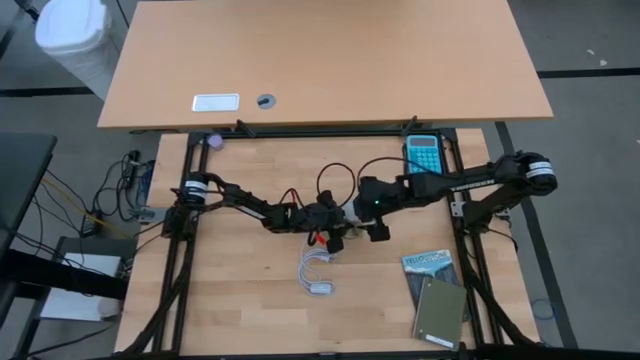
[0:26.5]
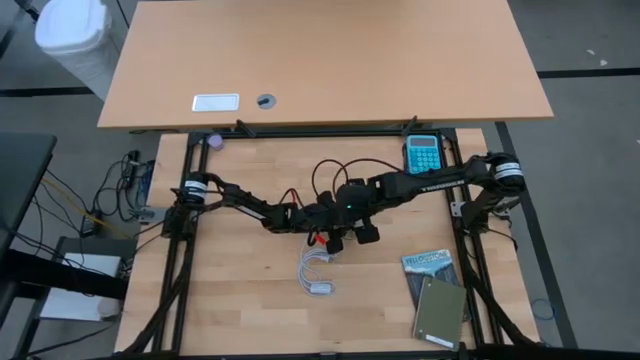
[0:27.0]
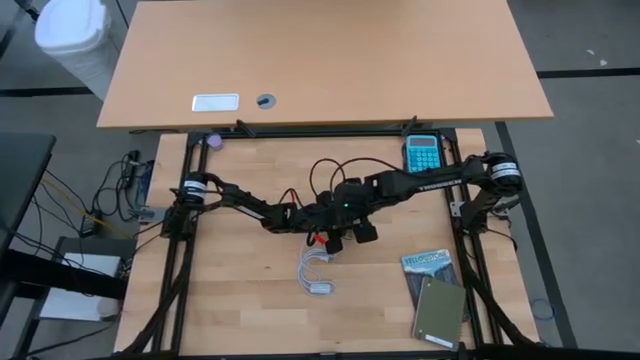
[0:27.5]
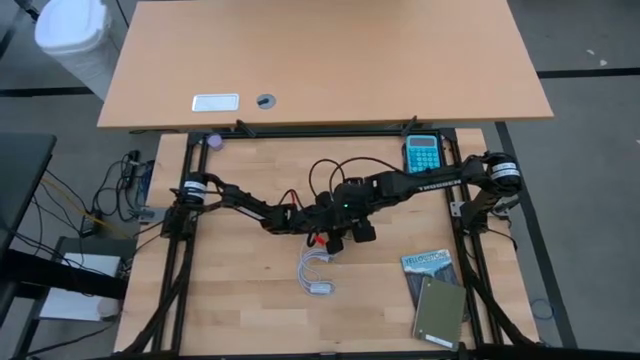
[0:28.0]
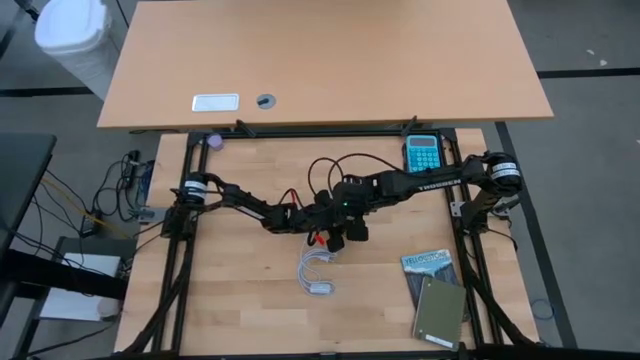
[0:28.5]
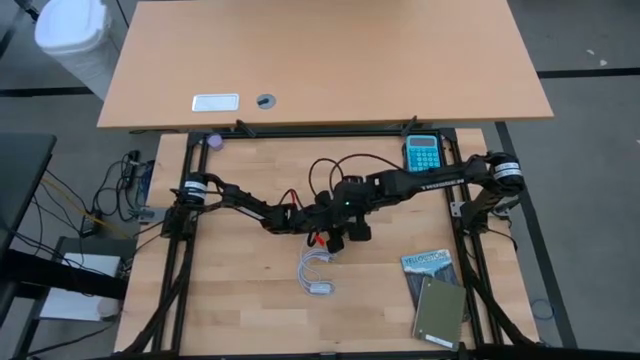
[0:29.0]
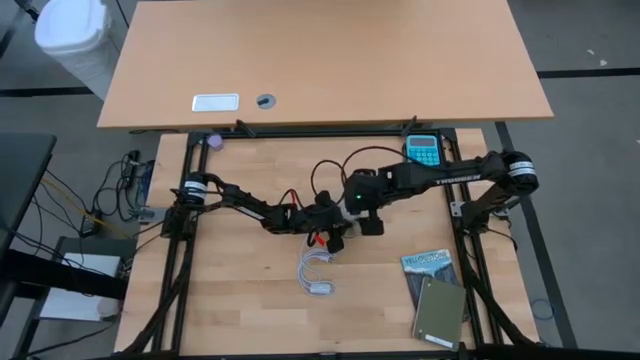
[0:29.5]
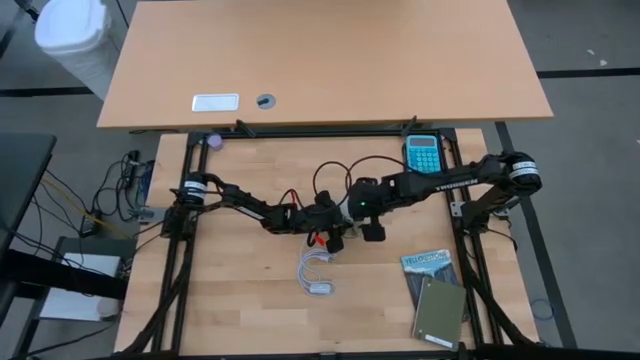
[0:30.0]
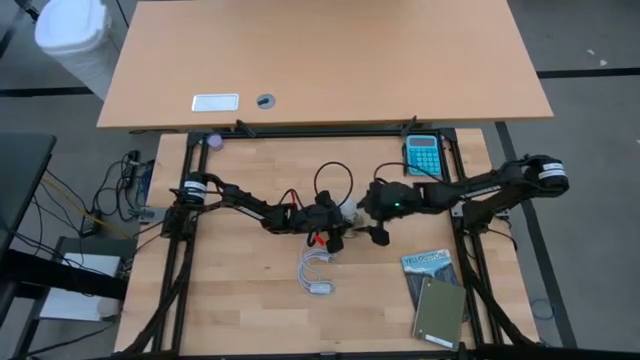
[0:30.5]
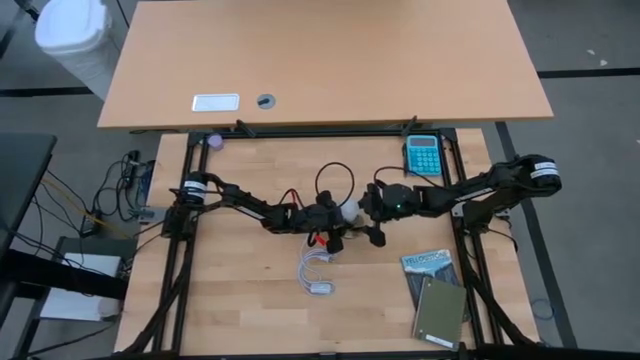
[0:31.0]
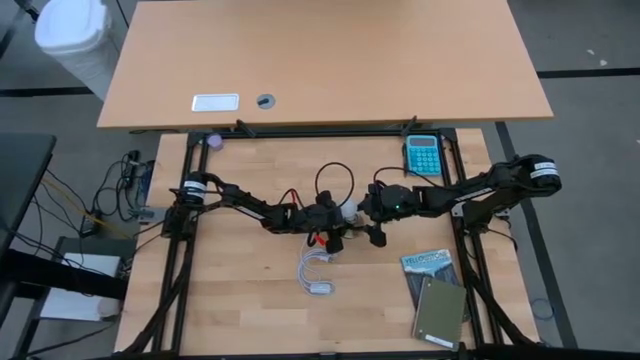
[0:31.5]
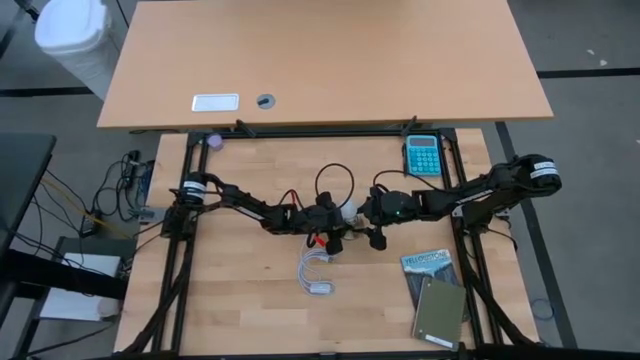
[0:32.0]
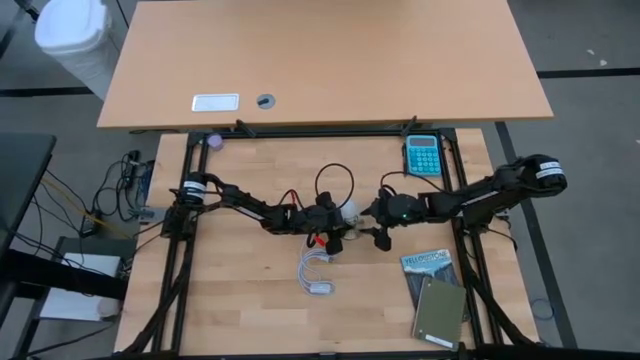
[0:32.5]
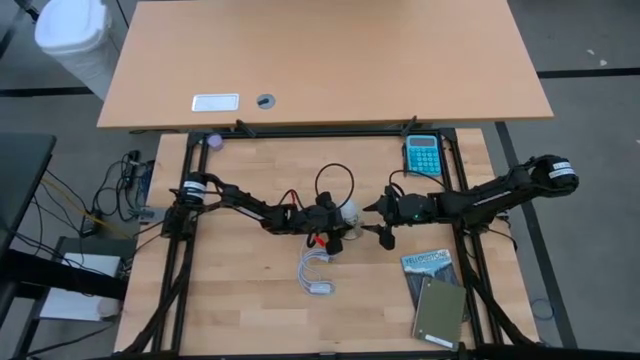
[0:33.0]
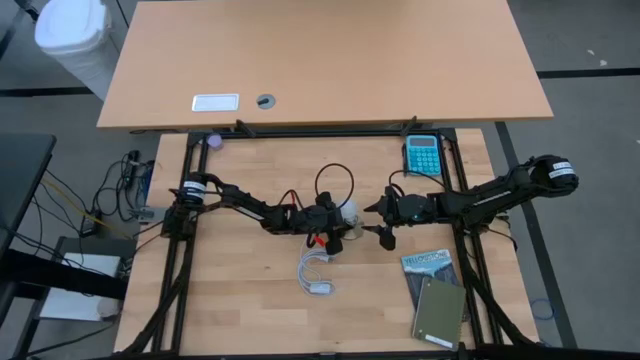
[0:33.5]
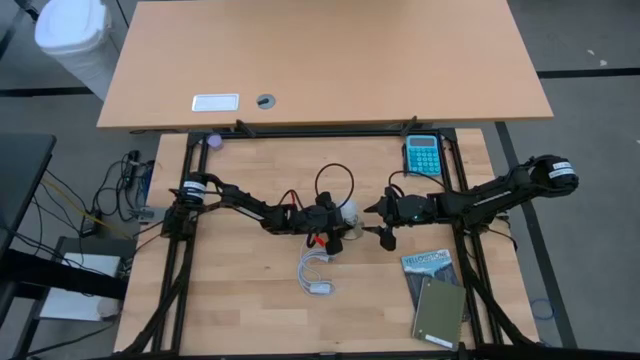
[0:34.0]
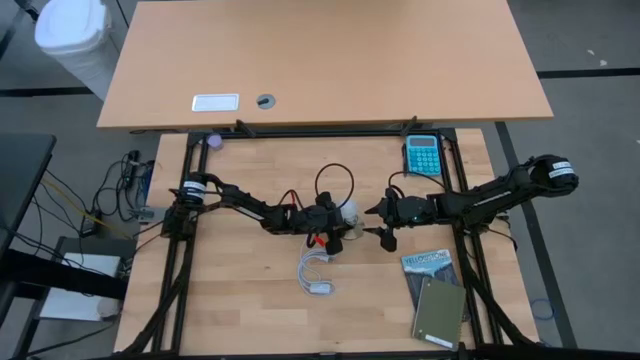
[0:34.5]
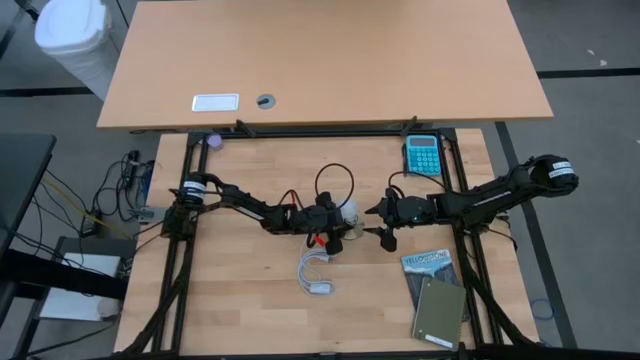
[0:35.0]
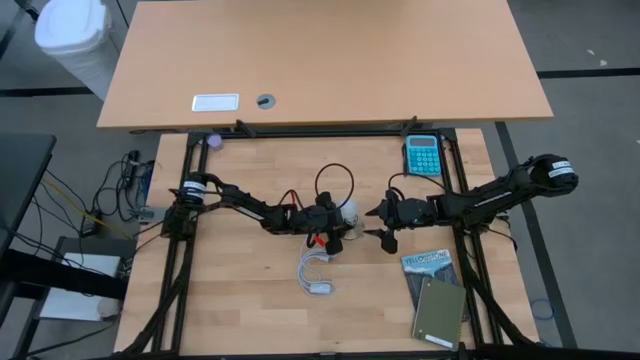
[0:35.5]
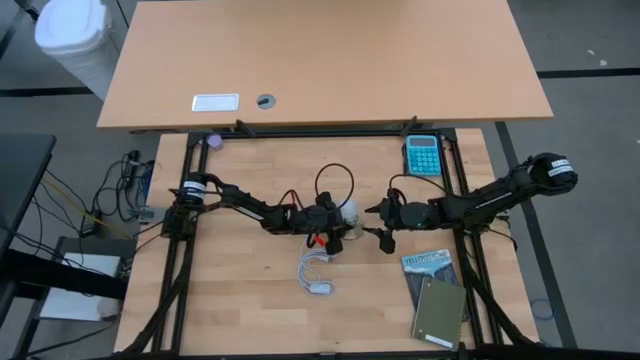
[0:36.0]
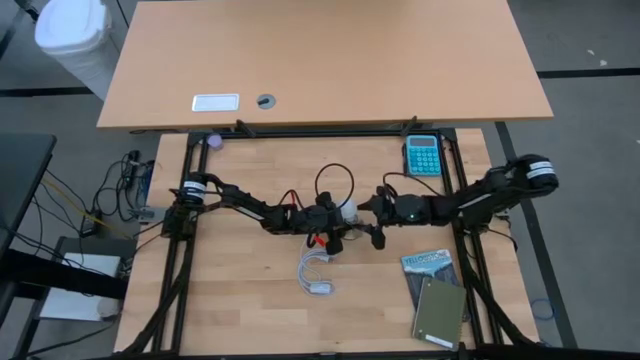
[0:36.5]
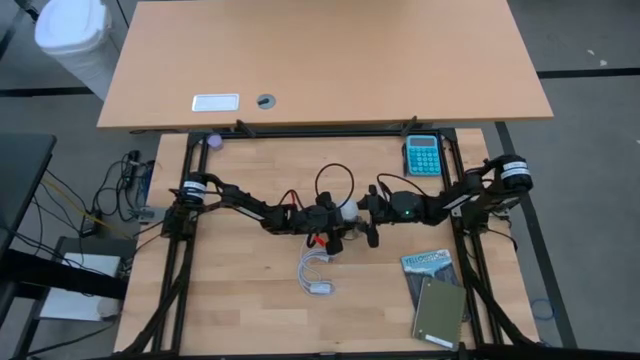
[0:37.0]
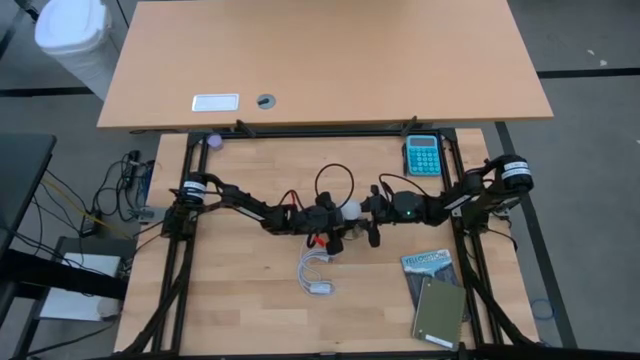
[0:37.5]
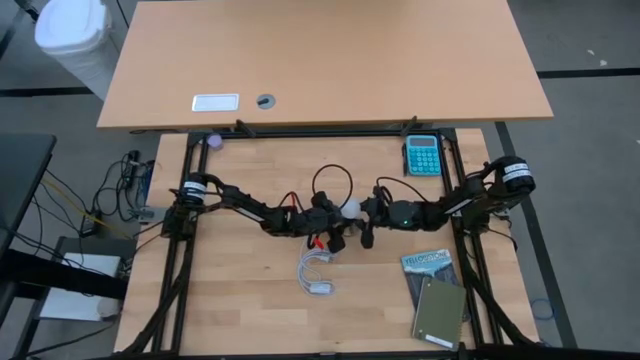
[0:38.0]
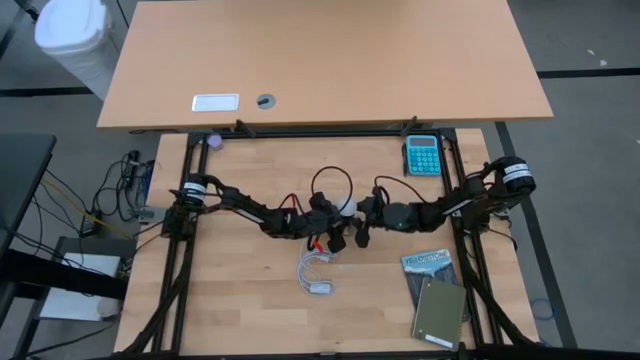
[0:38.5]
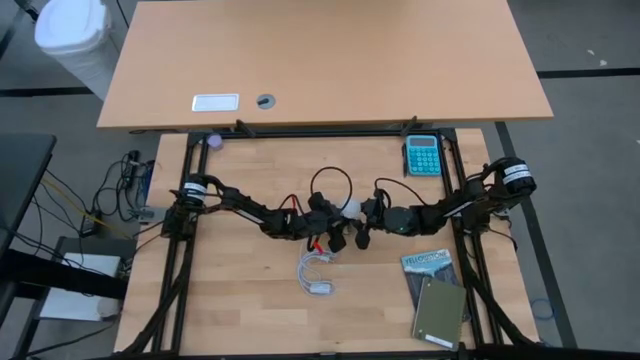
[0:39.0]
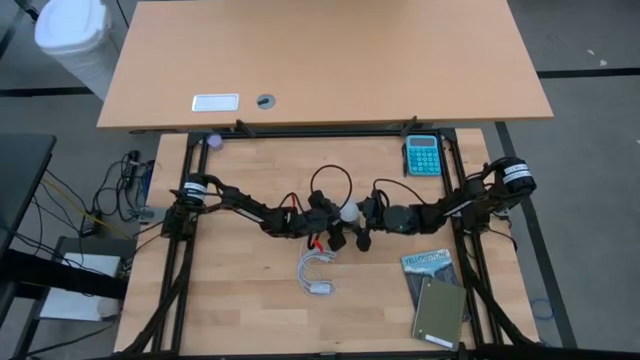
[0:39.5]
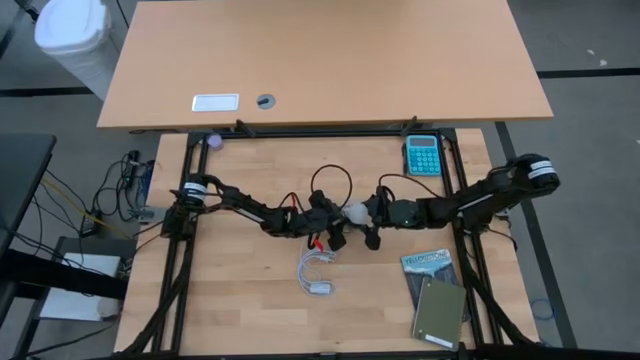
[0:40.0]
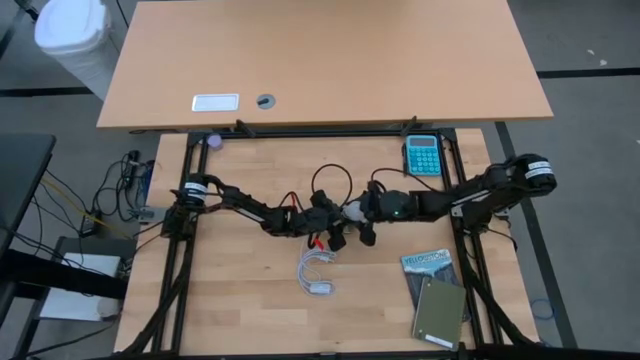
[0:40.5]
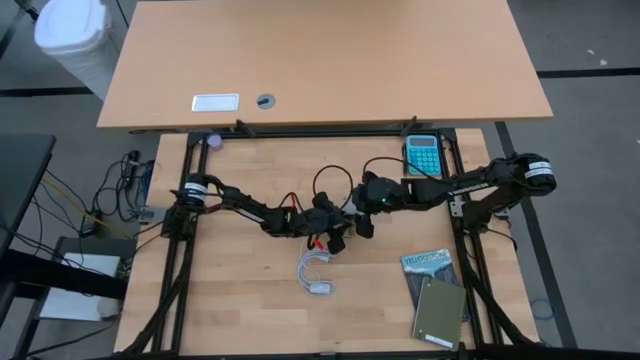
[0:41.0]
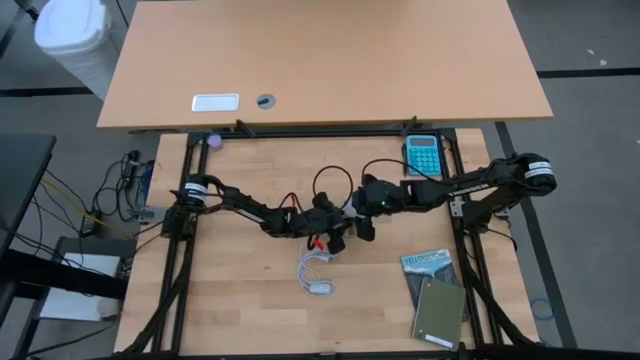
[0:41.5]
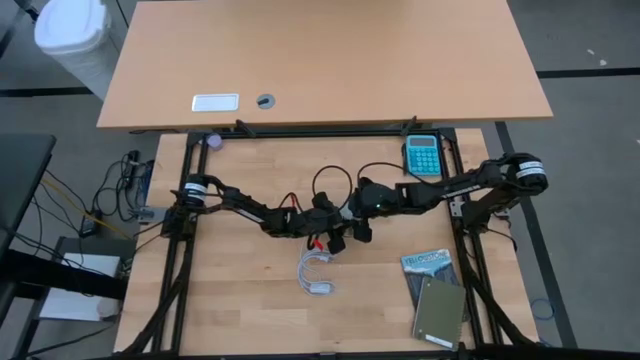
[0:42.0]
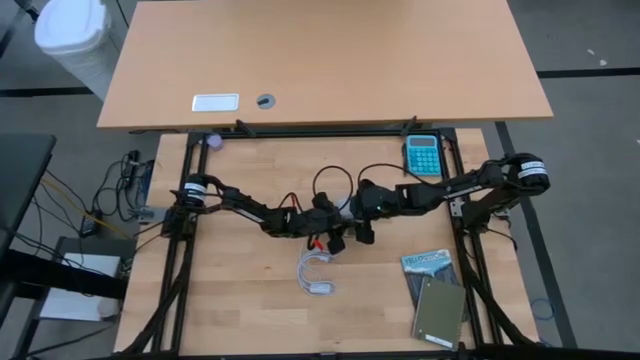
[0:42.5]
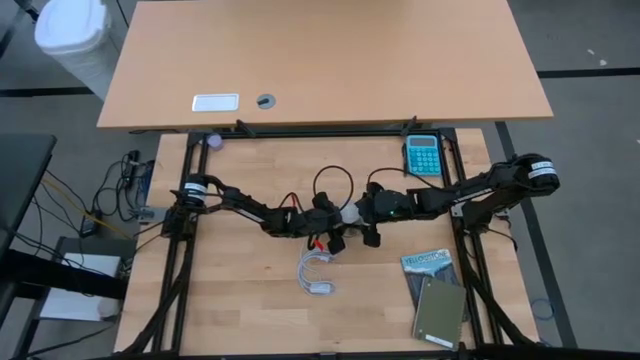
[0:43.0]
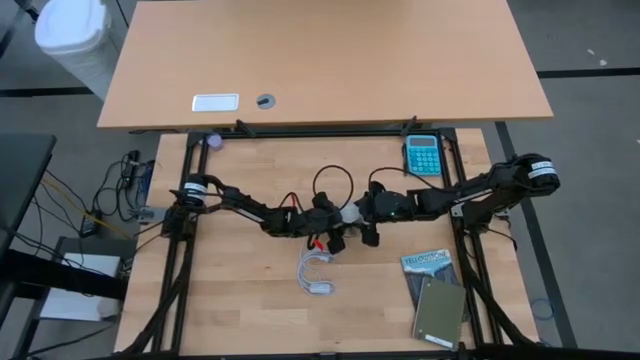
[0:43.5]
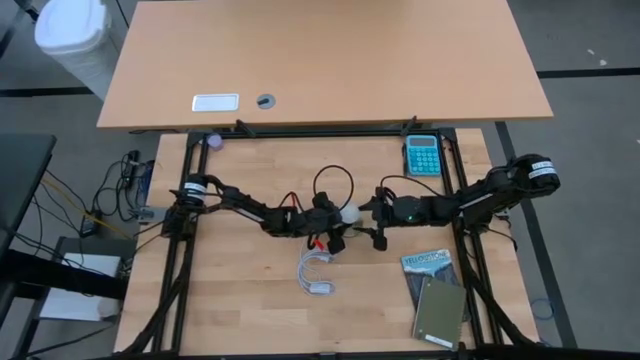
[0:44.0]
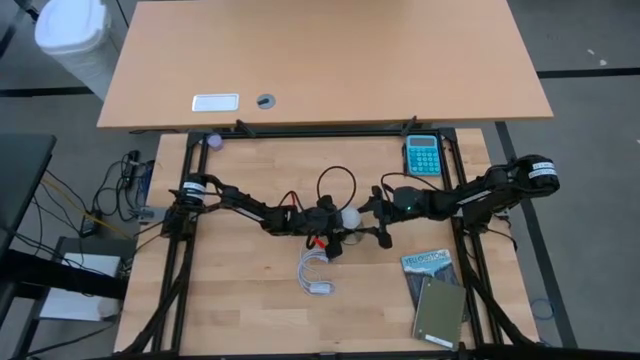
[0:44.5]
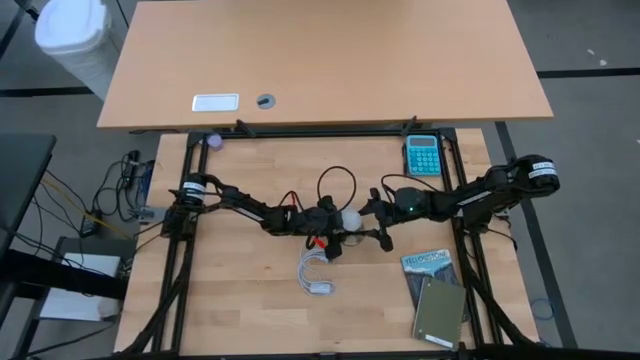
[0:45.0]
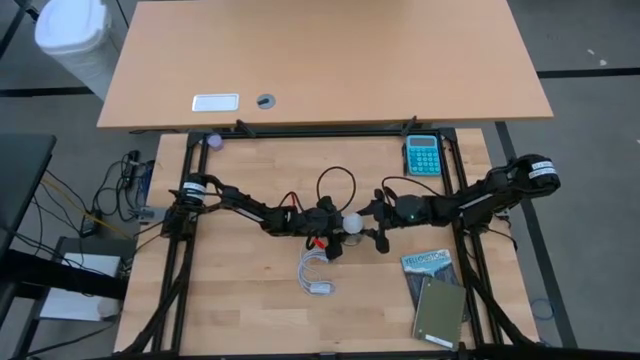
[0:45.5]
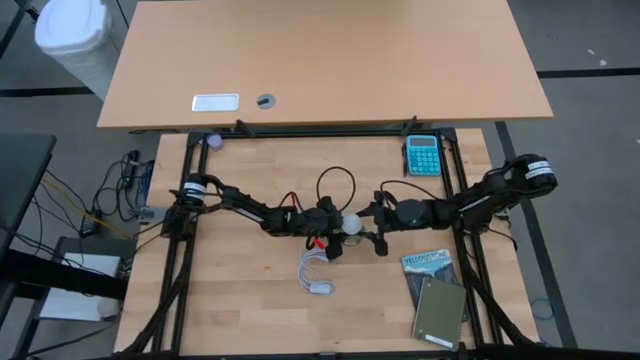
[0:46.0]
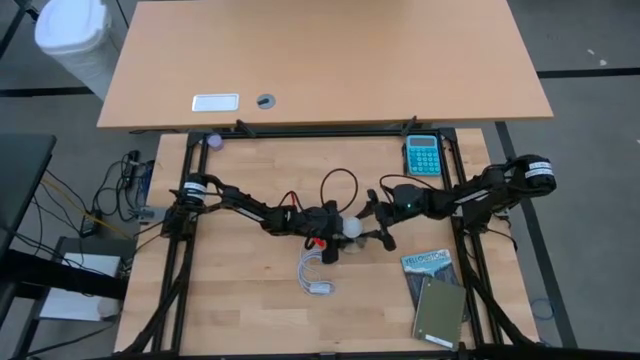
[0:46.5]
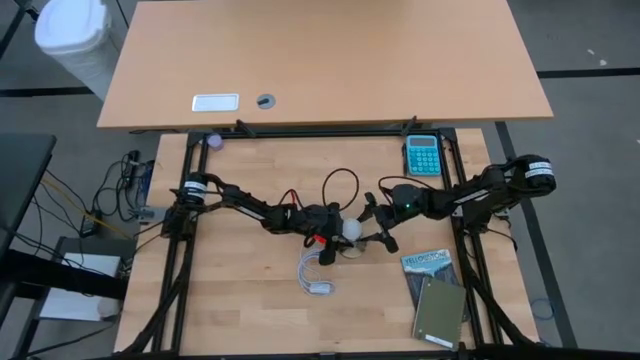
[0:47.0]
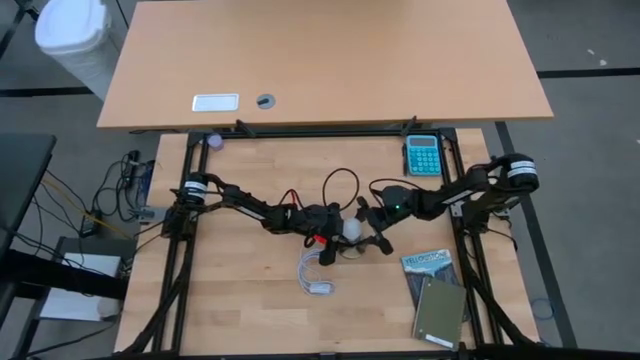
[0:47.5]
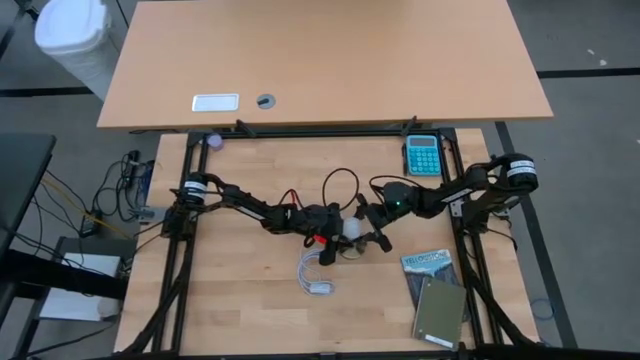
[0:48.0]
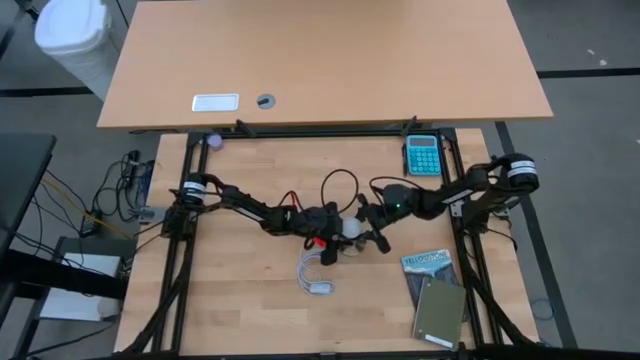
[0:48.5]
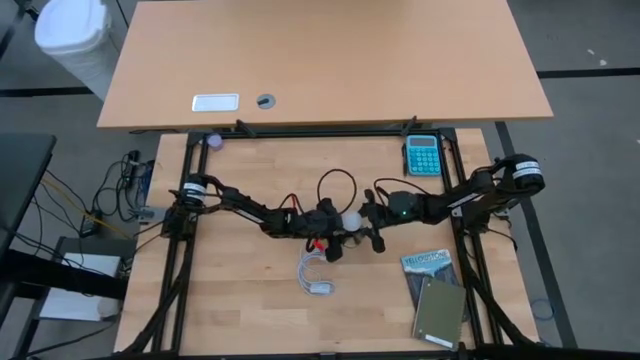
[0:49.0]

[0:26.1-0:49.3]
Task: Screw lightbulb
Insert the lightbulb into the desk lamp
